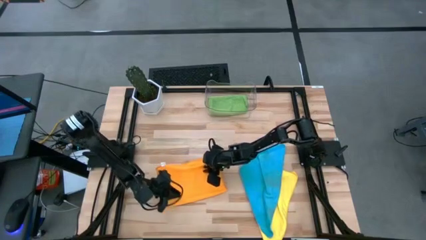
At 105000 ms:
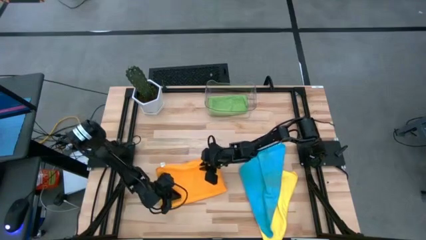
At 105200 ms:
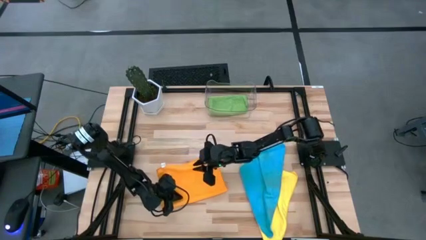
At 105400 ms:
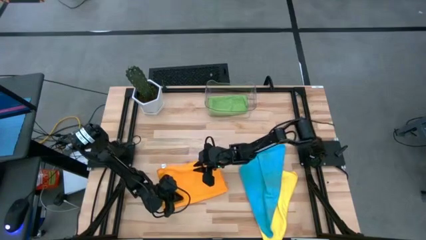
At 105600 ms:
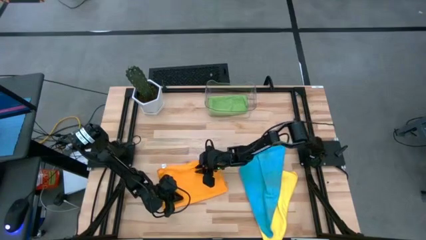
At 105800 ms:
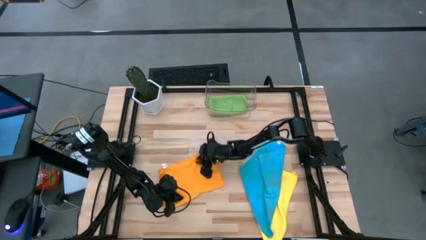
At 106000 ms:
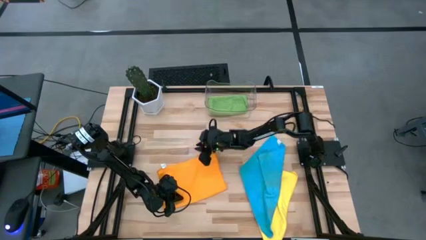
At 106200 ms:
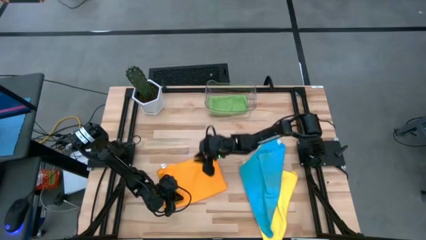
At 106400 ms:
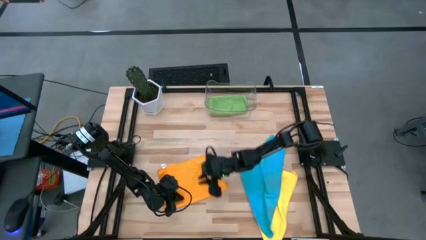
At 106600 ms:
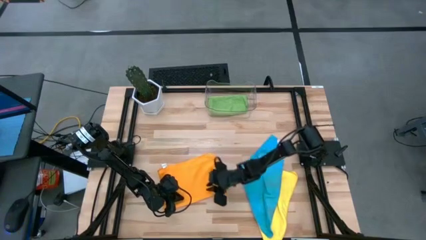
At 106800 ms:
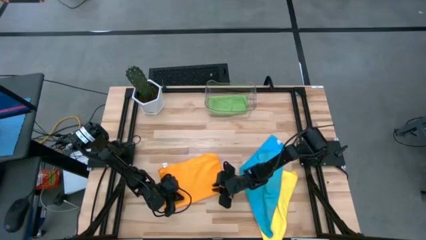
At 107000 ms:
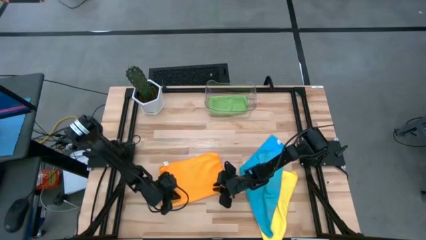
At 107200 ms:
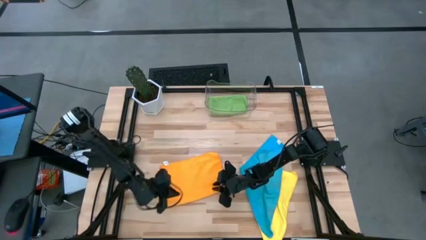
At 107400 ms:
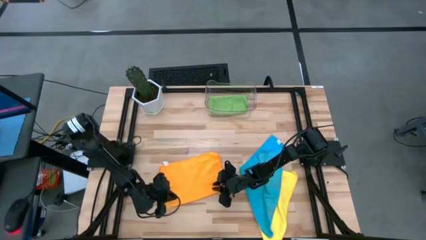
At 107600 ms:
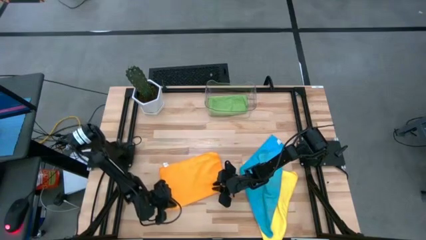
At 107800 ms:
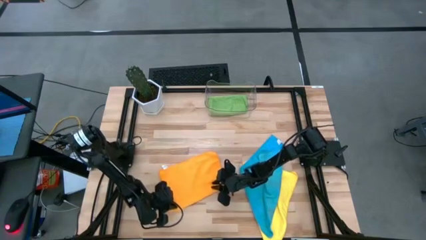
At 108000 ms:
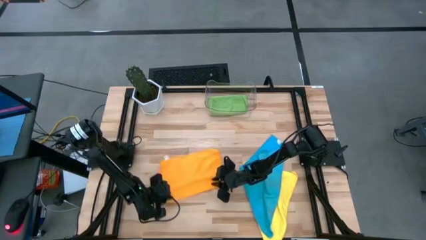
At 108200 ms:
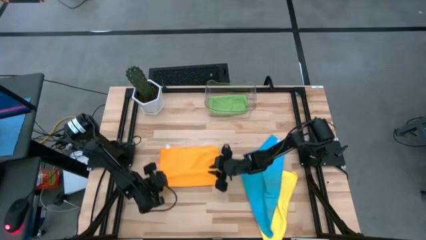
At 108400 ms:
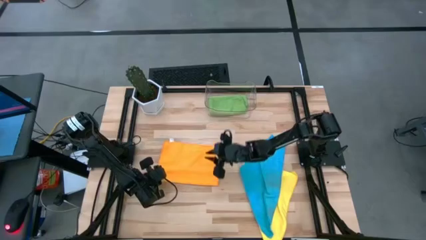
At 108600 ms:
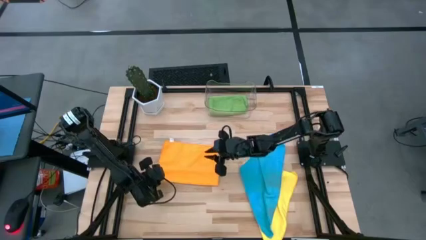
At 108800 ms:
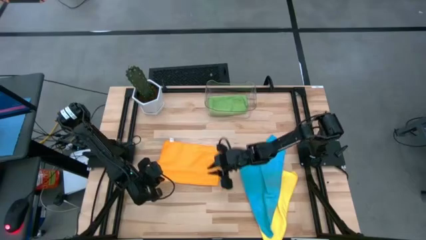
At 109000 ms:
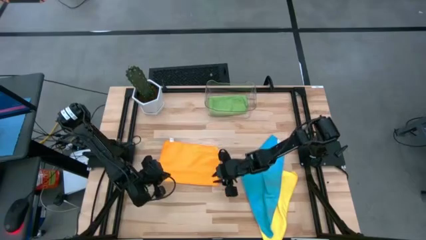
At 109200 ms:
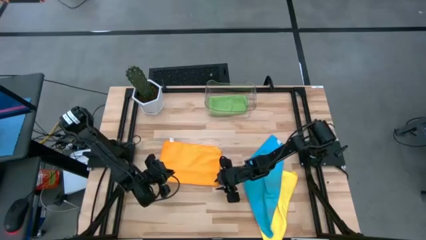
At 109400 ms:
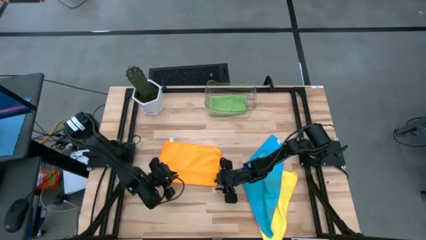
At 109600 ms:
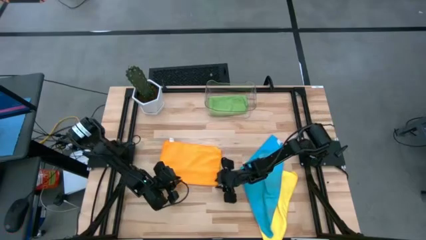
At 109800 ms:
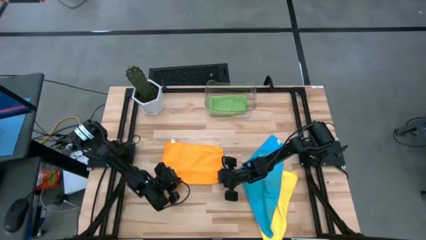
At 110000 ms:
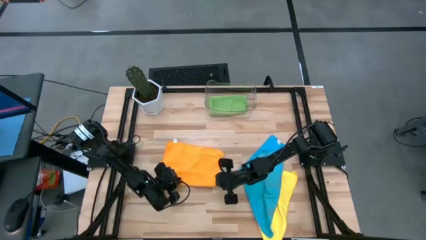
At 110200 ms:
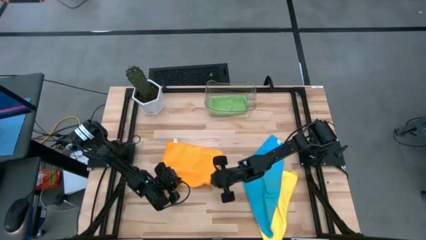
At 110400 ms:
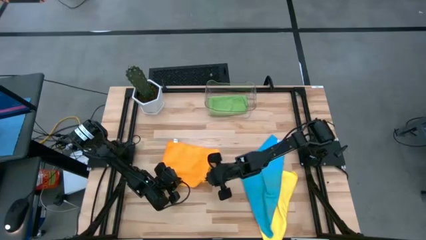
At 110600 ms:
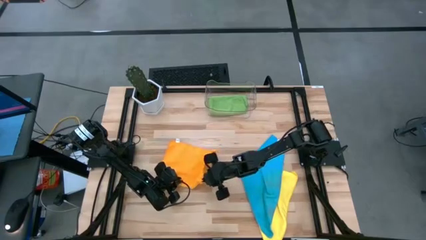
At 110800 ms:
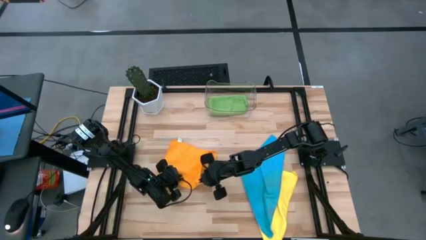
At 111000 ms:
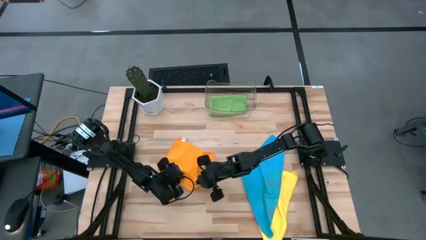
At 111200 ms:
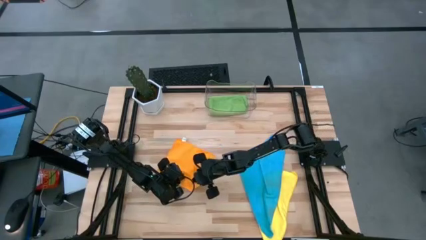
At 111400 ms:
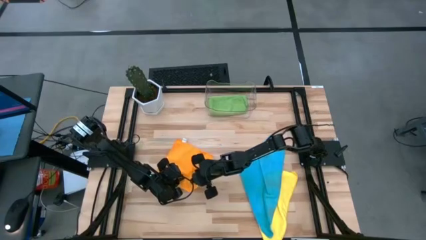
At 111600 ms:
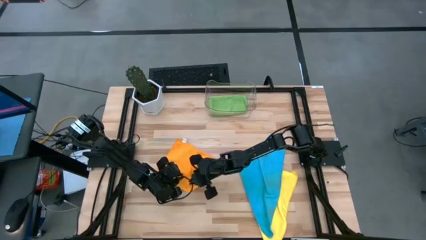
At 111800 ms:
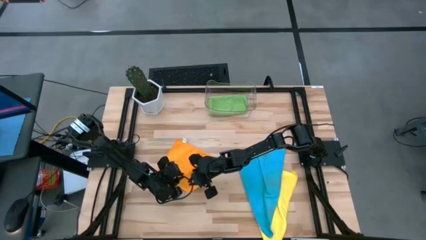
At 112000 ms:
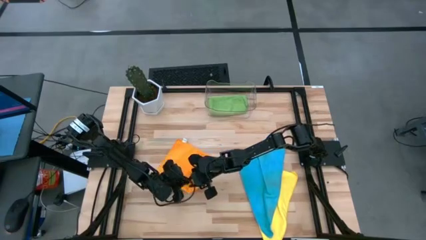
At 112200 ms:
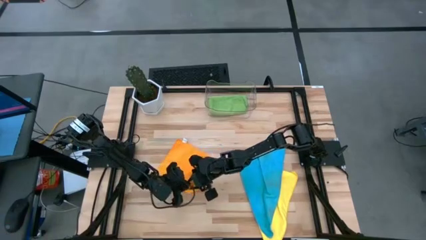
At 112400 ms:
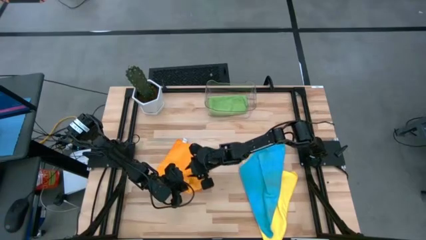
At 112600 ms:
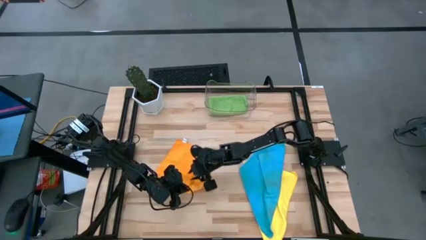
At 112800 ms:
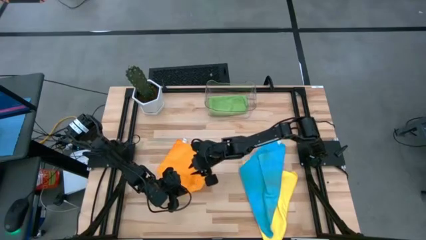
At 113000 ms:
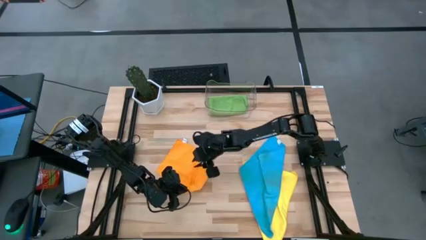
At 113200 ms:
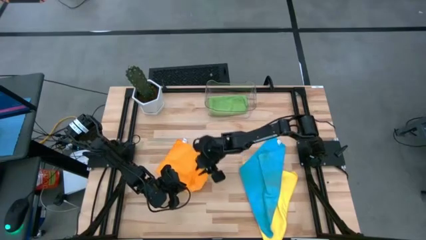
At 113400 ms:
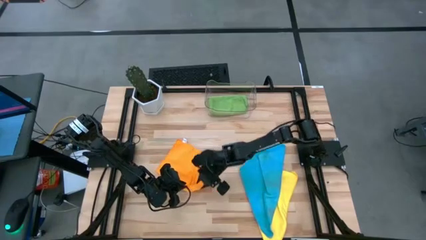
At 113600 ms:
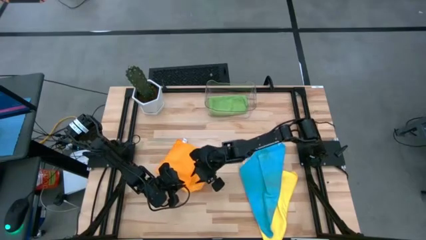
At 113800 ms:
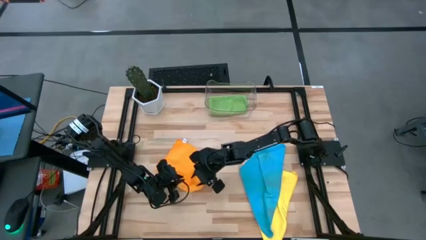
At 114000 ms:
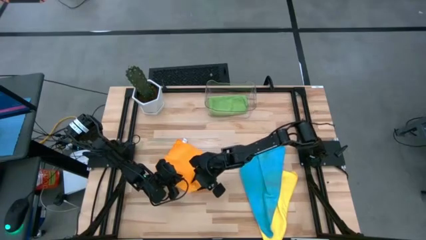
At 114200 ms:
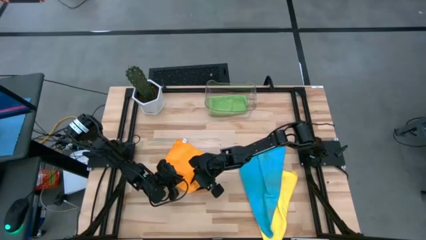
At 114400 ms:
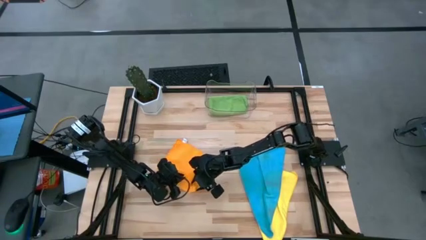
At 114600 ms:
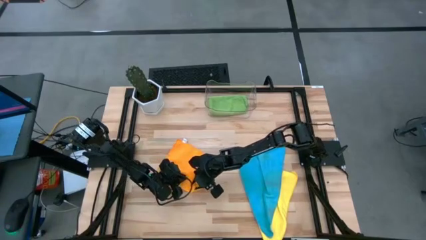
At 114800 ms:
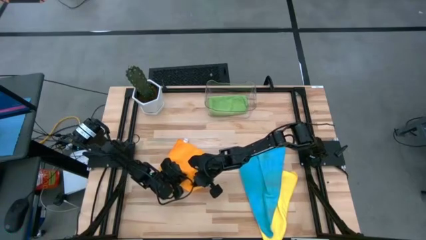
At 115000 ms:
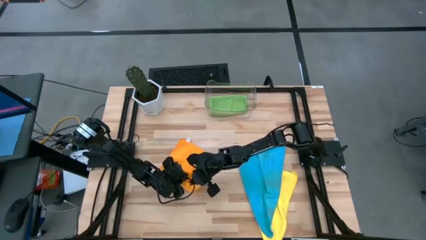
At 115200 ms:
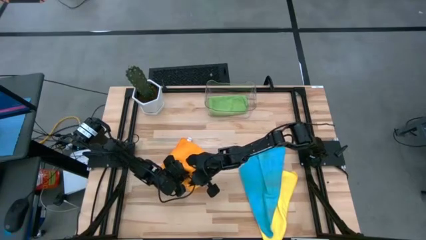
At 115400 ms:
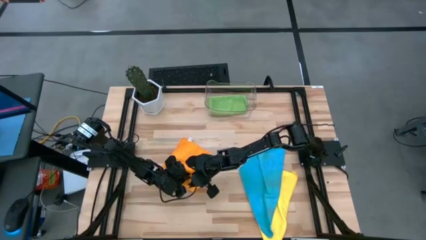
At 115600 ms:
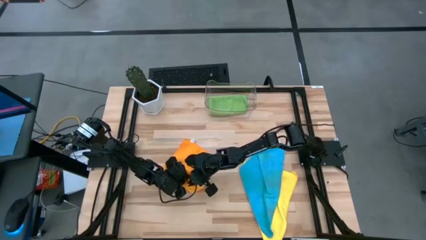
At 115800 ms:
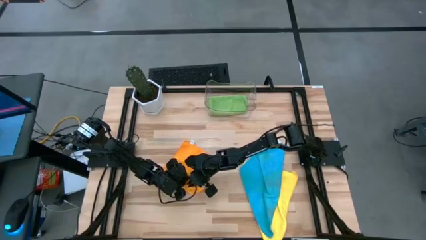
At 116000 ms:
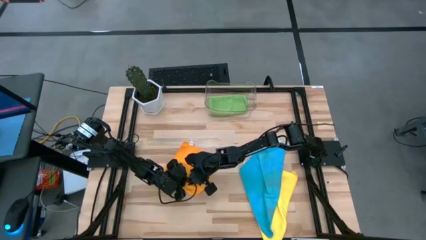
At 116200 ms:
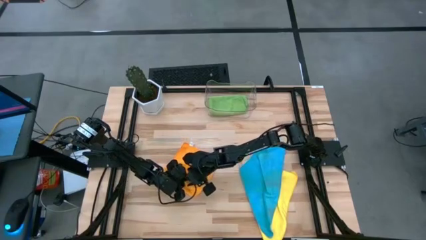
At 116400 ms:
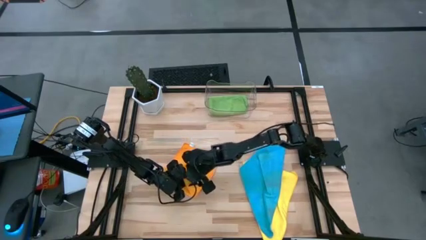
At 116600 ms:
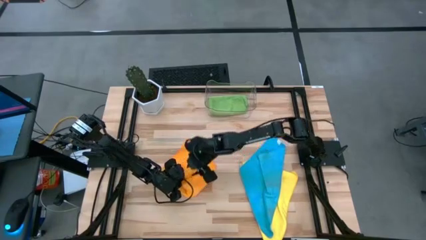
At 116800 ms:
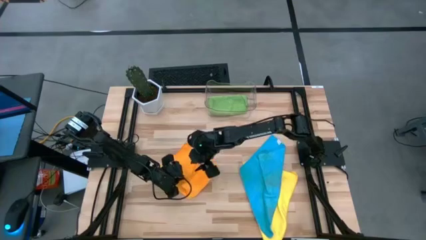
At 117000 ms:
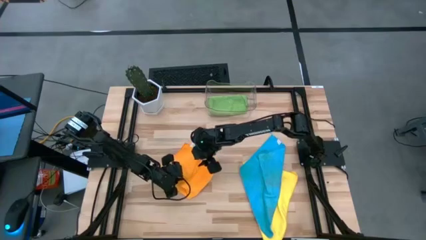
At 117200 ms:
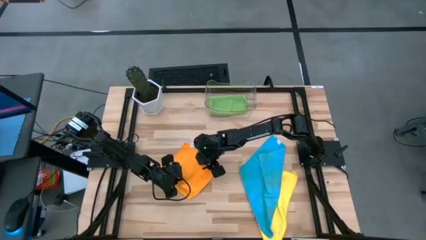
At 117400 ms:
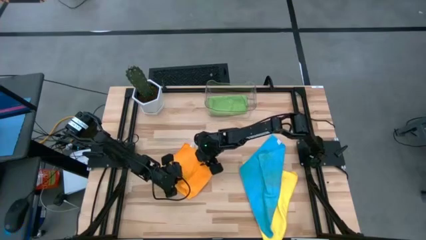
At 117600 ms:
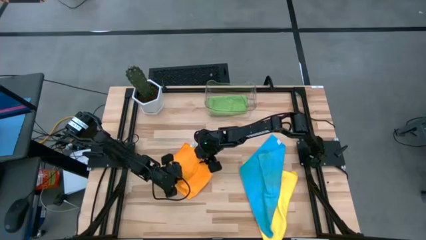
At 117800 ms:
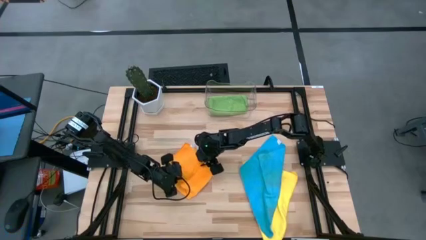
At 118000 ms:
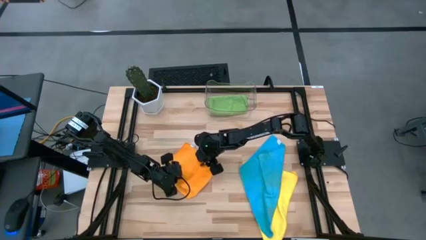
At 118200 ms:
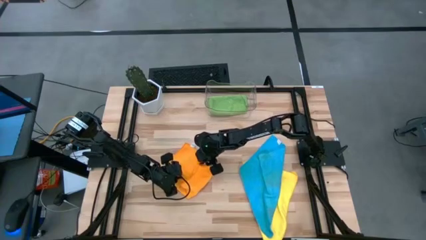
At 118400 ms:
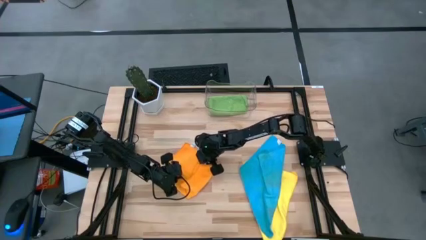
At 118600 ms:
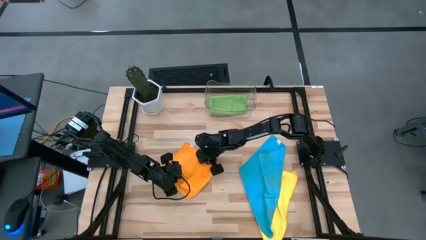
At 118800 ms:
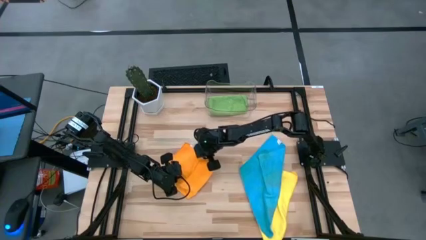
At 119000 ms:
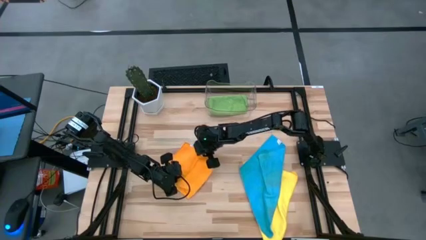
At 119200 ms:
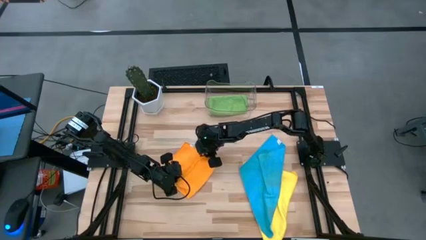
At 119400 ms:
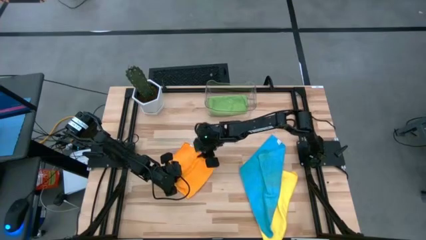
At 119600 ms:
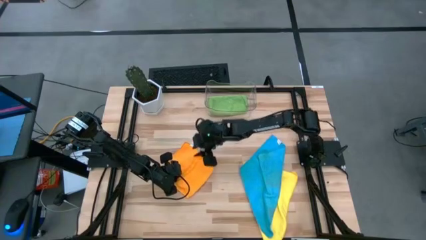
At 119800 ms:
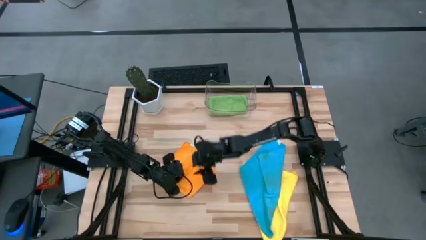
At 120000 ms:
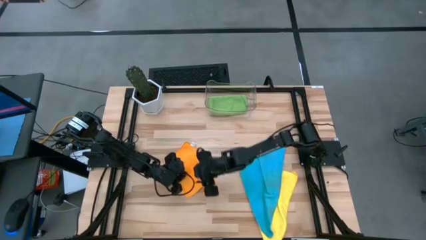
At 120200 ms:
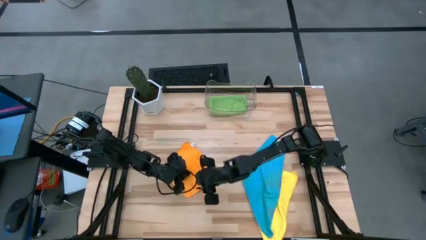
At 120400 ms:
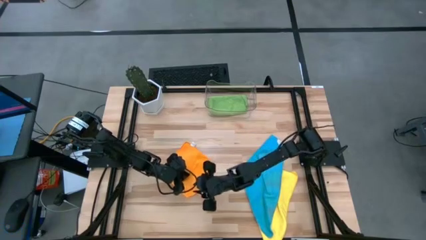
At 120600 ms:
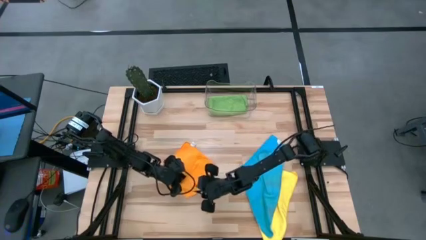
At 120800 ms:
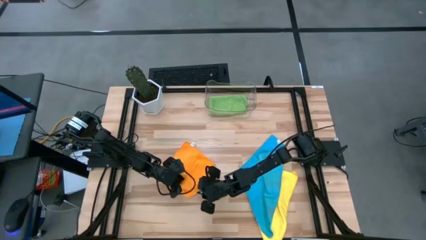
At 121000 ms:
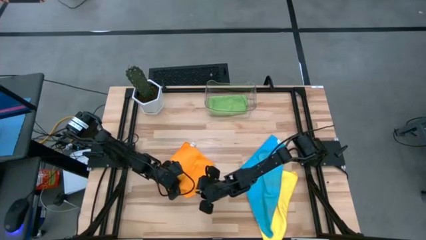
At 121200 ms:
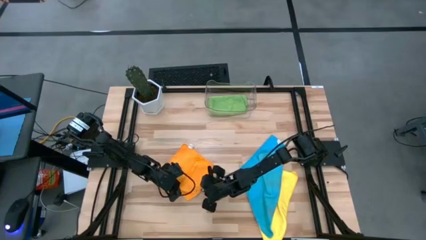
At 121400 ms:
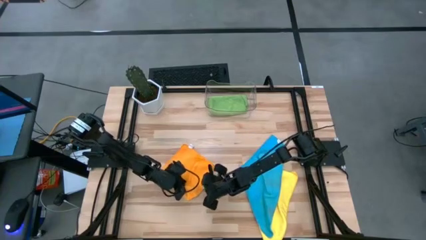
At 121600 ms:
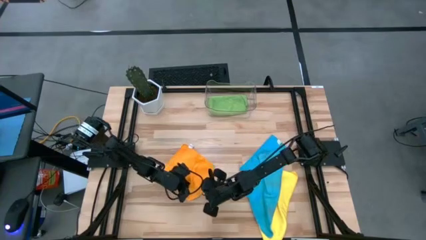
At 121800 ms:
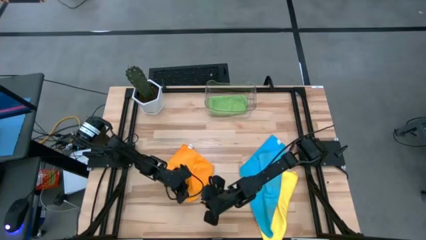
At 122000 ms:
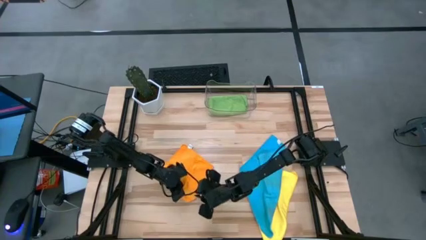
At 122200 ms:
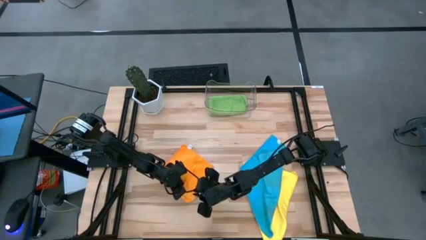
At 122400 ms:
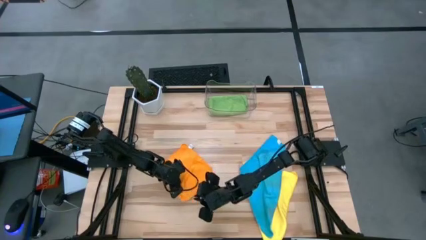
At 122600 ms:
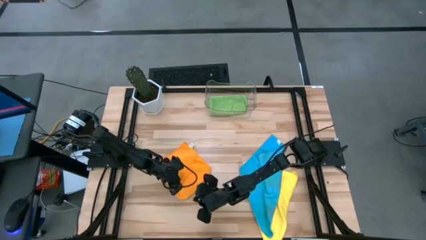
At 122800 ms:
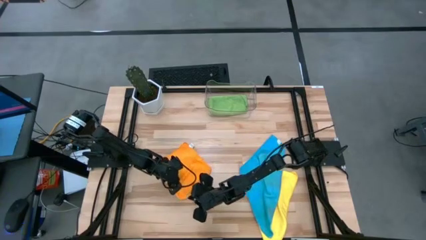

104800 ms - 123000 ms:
Task: Fold microfiber towels
Fold the orange towel
